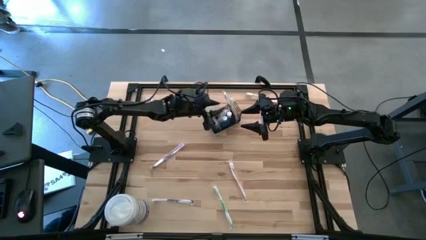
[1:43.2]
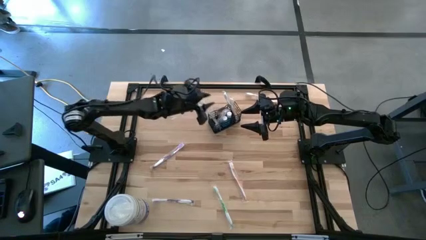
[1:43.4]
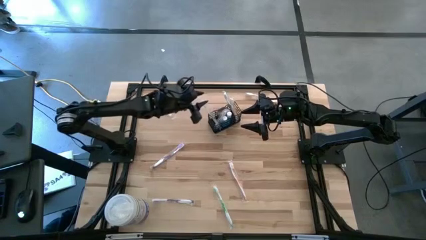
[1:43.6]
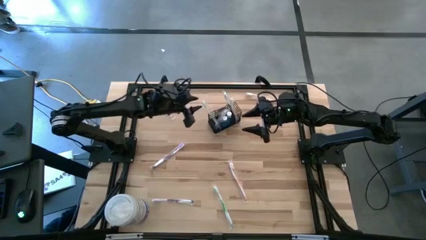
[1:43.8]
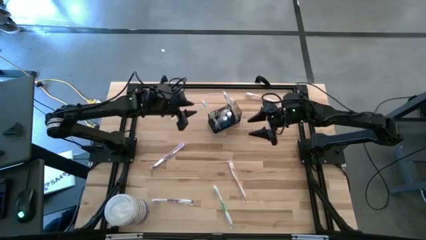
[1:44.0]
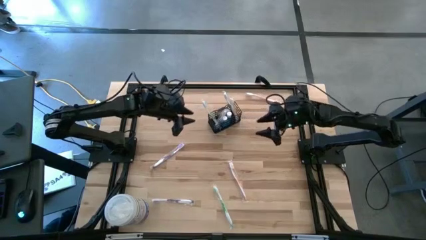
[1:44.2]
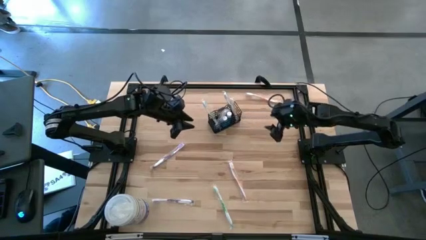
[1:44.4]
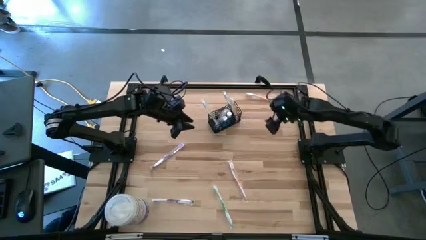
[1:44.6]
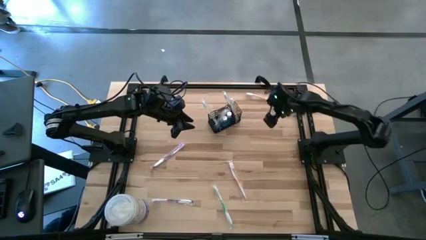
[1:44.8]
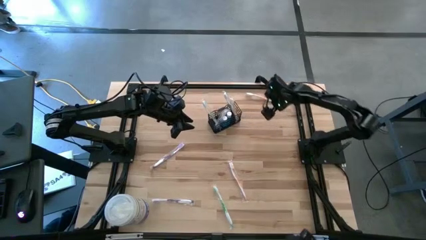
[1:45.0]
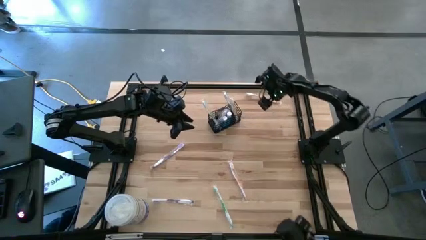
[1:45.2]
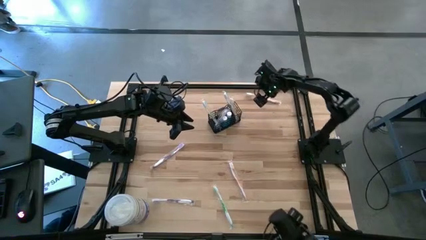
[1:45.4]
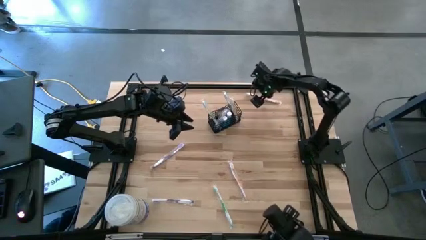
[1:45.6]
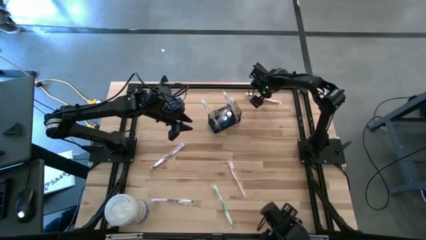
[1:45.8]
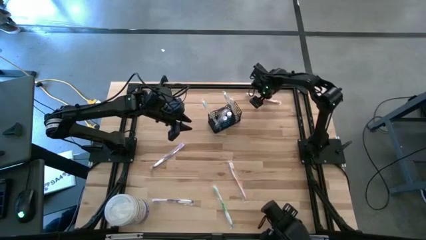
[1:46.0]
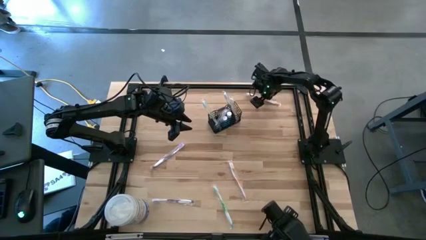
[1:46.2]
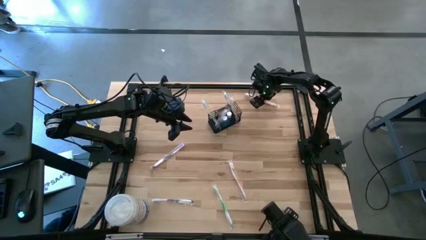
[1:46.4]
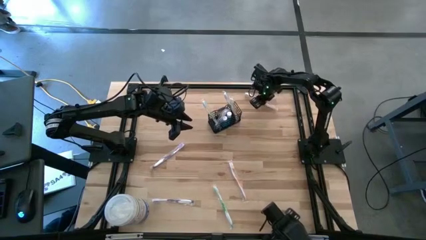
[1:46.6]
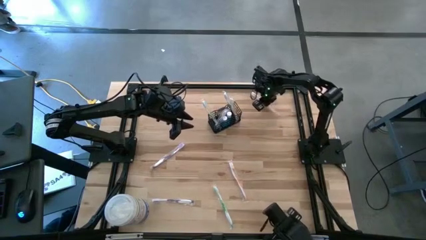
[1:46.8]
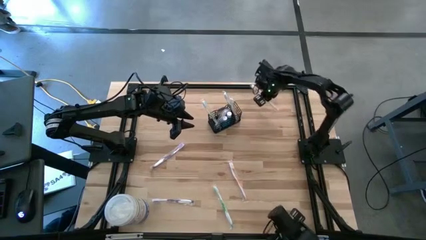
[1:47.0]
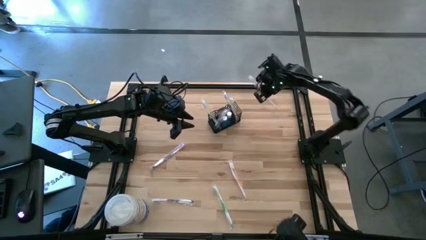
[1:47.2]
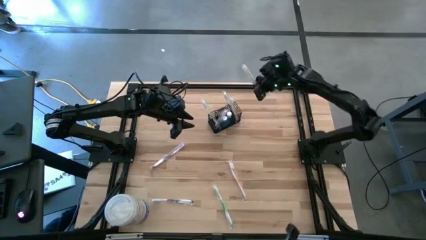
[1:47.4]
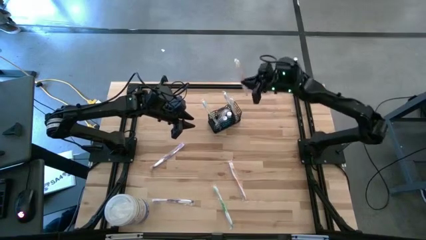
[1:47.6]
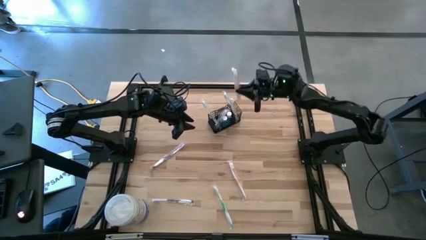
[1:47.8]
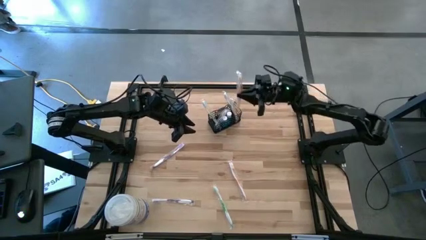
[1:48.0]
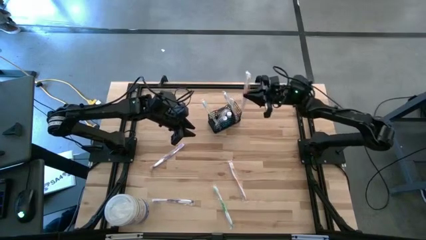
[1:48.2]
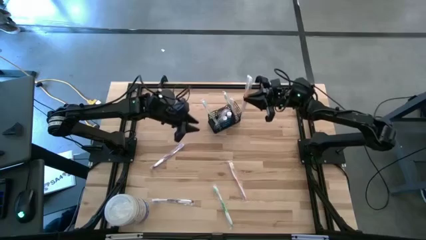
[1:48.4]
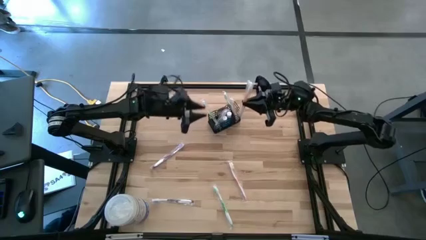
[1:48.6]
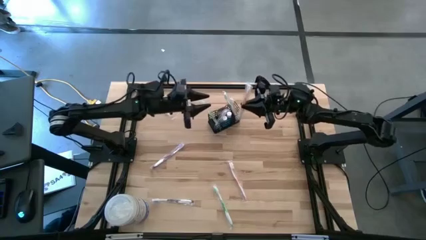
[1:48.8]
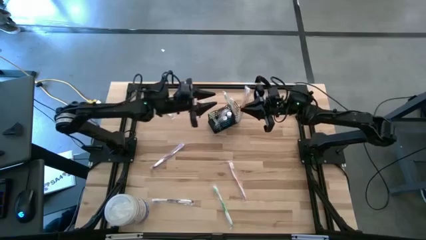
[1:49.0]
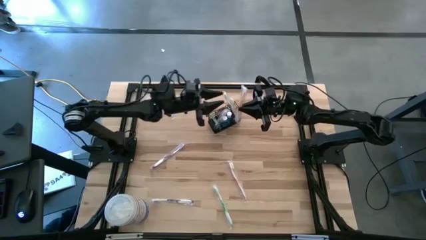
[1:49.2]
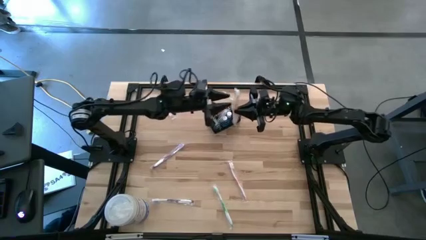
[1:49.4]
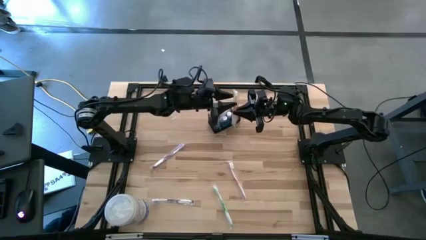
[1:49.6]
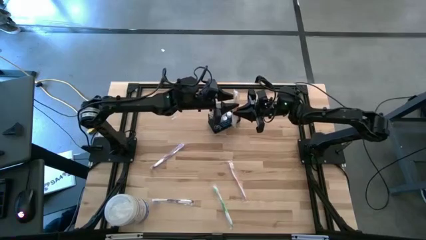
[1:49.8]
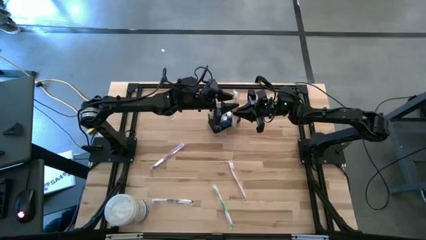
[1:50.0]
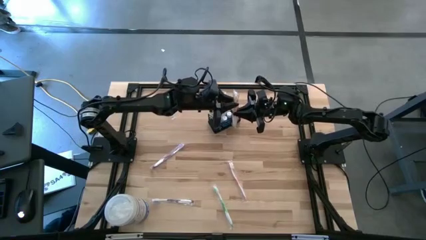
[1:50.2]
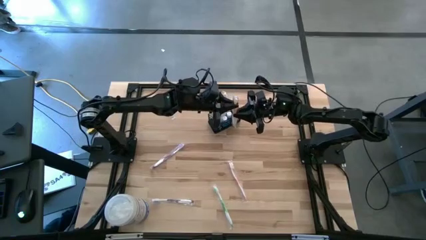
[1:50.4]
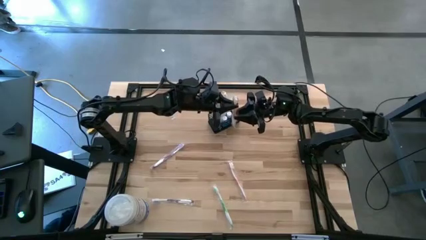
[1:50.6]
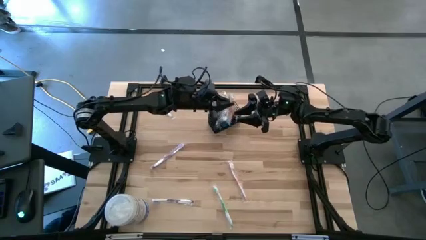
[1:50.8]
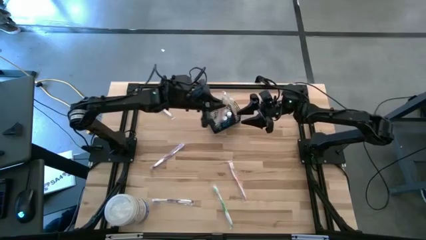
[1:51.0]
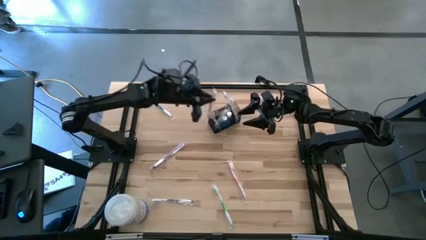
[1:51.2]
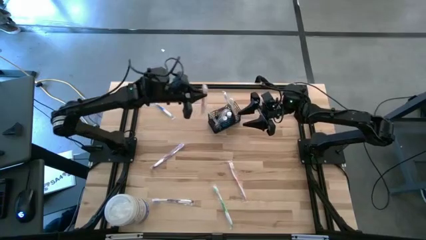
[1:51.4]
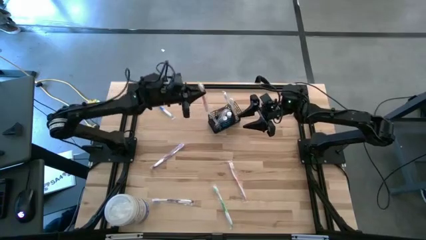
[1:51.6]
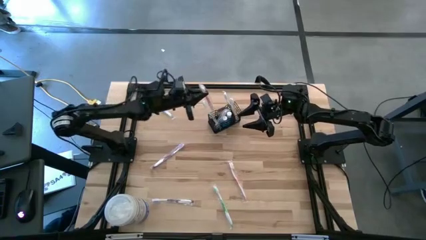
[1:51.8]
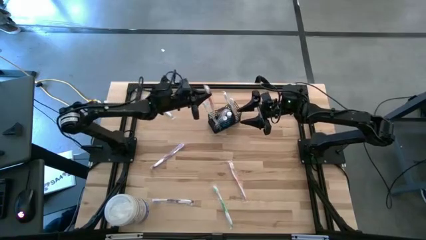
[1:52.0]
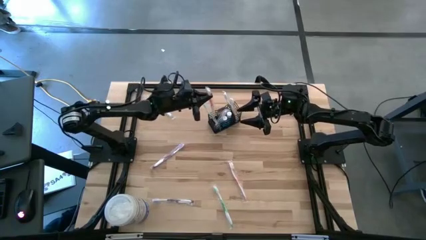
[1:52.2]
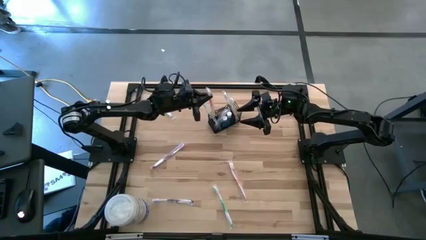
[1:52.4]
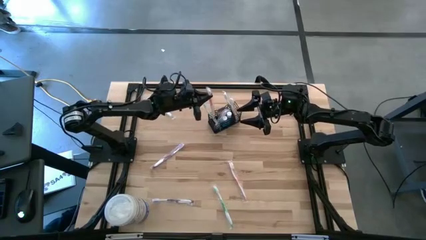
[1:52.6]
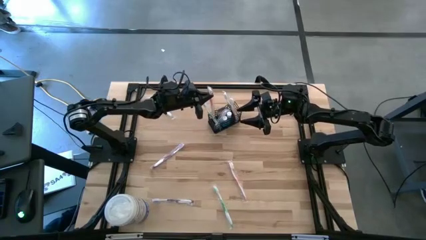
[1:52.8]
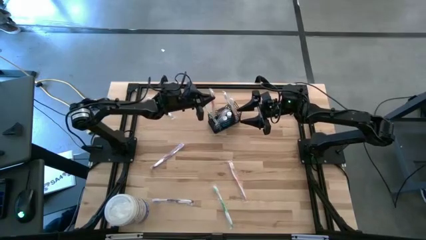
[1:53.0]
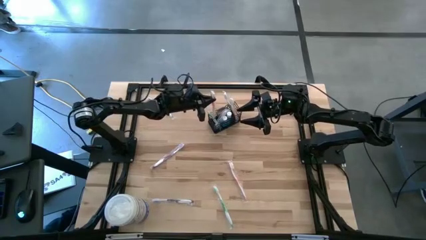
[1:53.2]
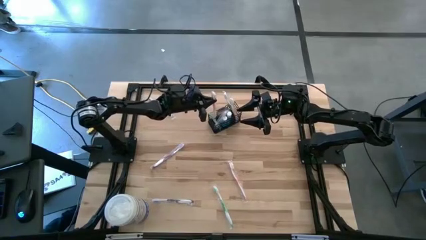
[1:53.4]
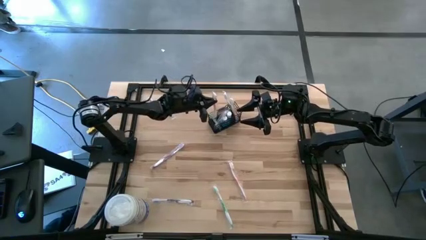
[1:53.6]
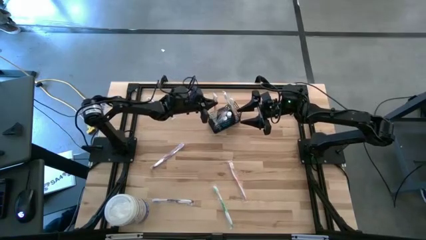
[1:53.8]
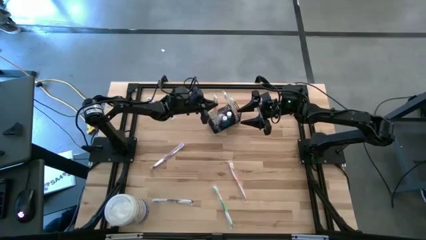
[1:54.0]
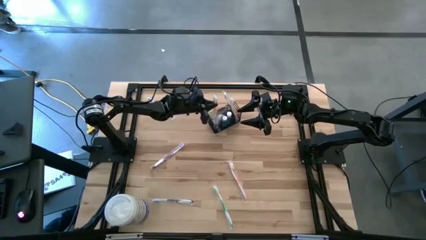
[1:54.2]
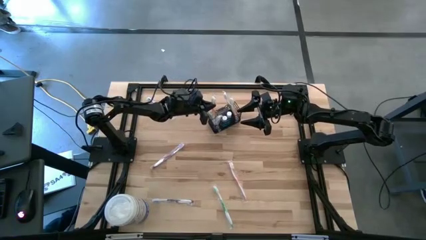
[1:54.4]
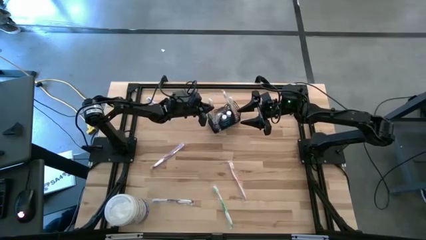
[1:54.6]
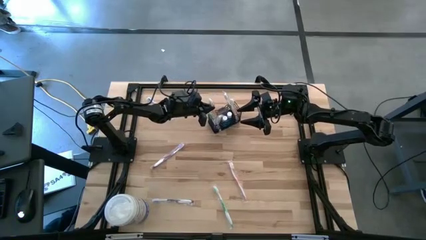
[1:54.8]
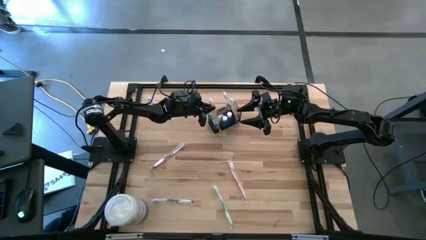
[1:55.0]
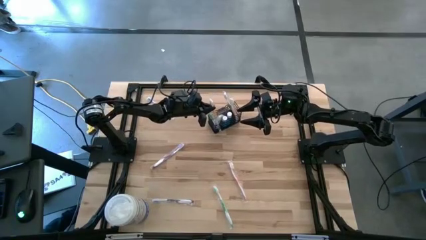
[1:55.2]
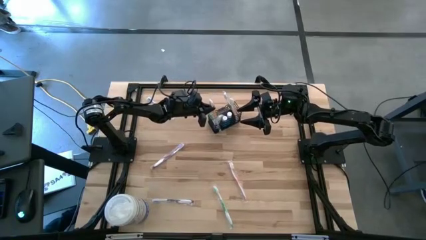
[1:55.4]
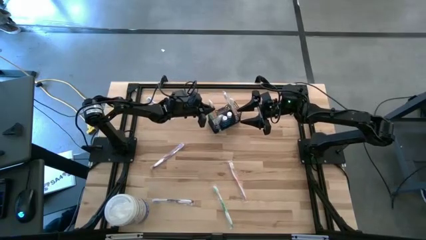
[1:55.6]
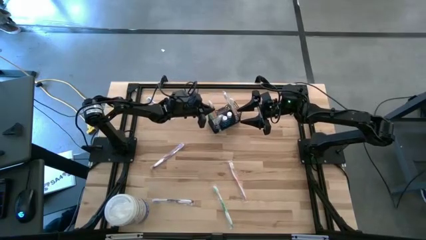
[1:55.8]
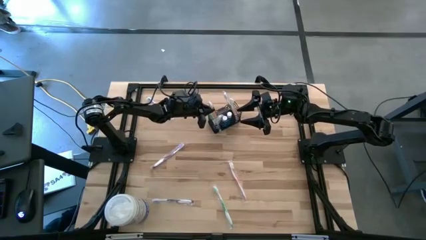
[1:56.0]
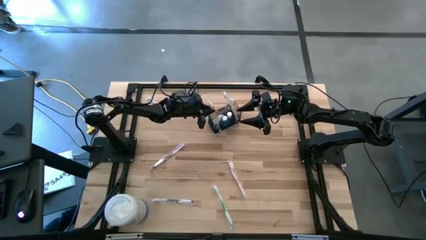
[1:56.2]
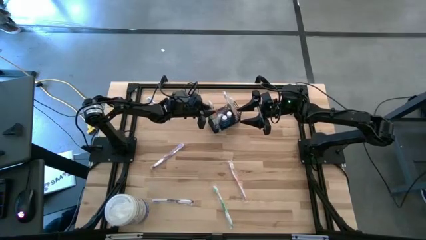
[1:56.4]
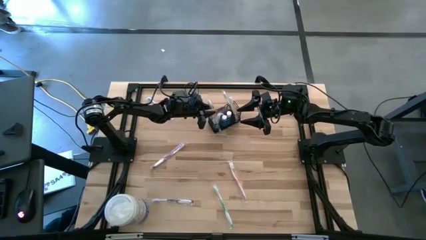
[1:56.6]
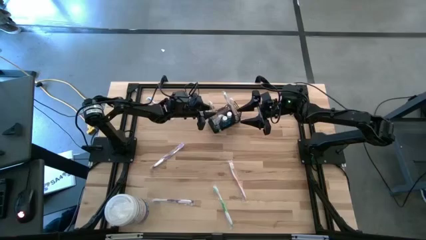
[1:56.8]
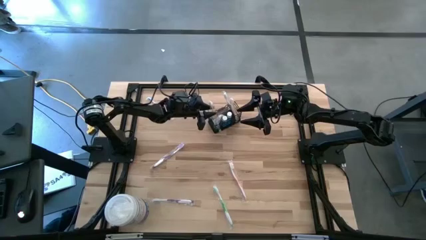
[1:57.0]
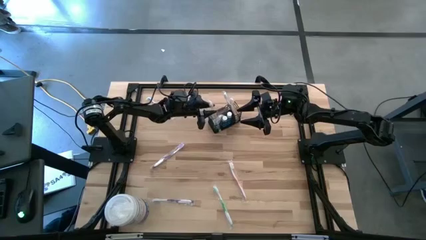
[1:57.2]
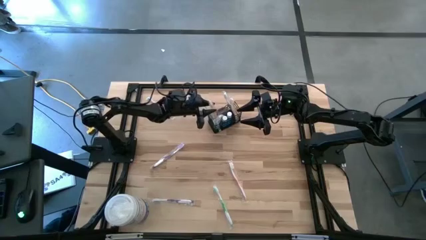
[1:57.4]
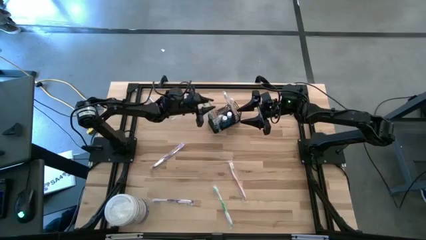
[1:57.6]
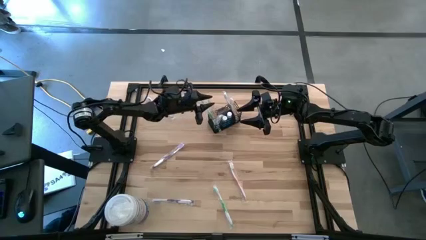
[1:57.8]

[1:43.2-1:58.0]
Task: Pick & Place toothbrushing station
Put the top orange toothbrush into the mesh organizer

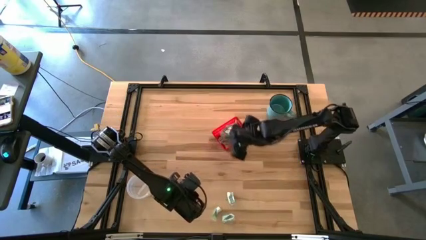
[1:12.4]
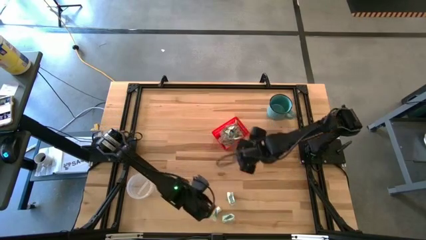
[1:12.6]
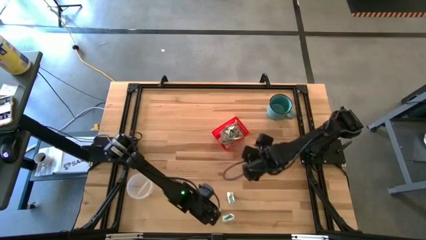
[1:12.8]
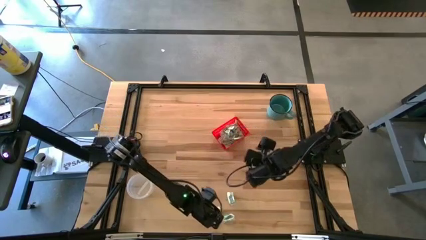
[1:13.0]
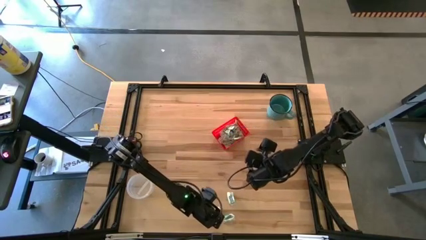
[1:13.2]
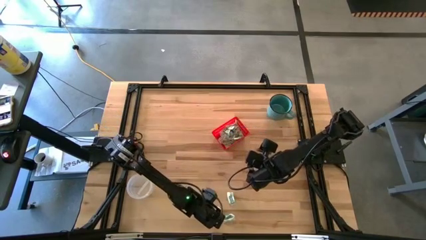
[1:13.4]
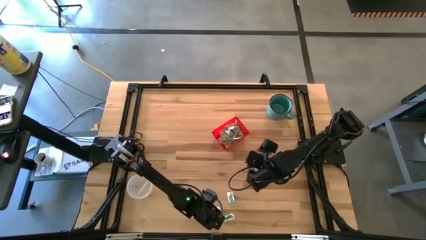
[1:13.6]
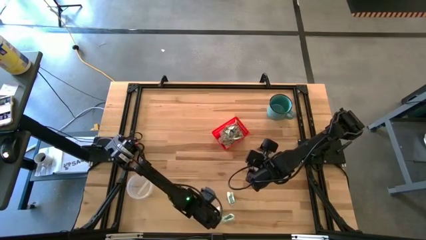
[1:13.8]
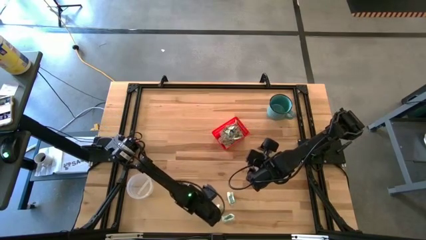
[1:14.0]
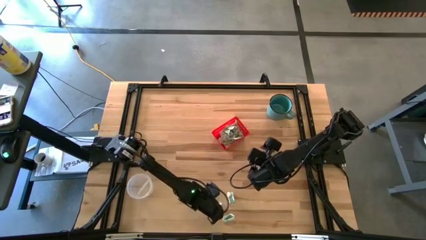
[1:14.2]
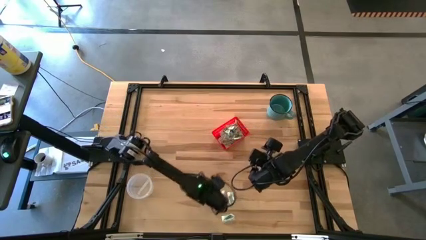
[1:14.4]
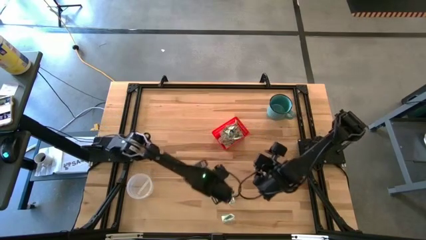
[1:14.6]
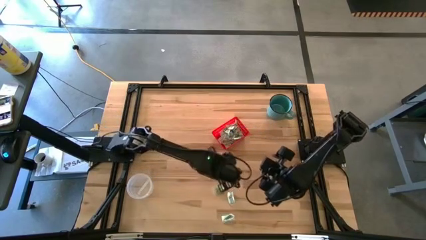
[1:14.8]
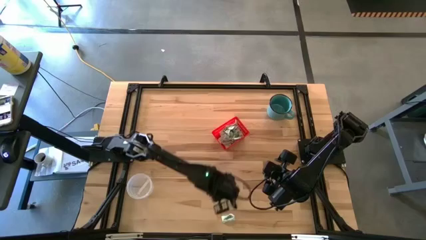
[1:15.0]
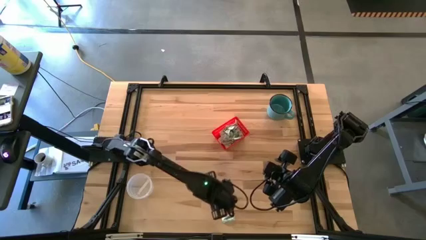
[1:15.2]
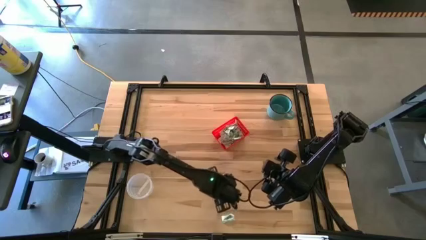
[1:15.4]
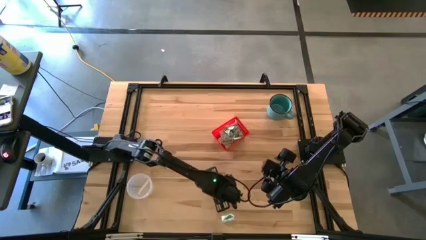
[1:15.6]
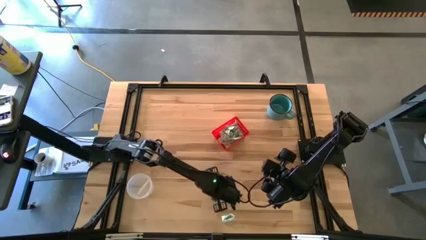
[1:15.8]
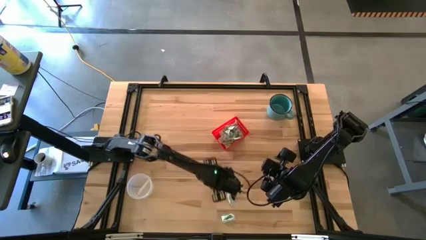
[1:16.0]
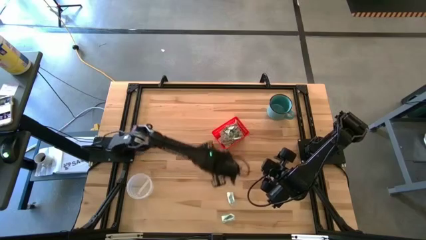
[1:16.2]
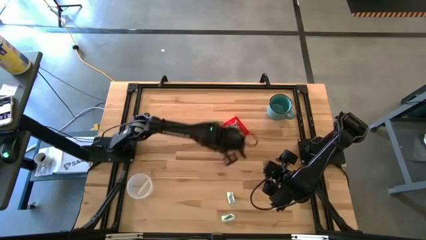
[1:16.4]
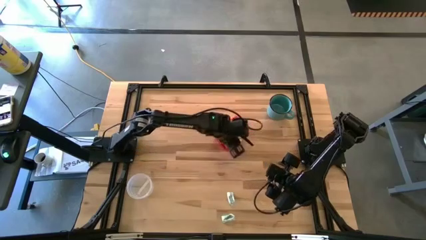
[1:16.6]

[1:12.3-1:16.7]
Task: Pick and place items into bin
Put the stevia packet into the red bin
